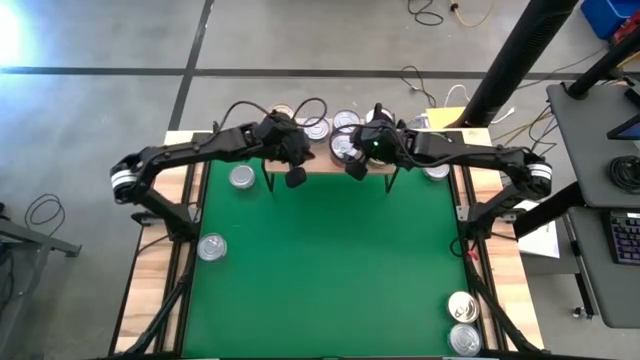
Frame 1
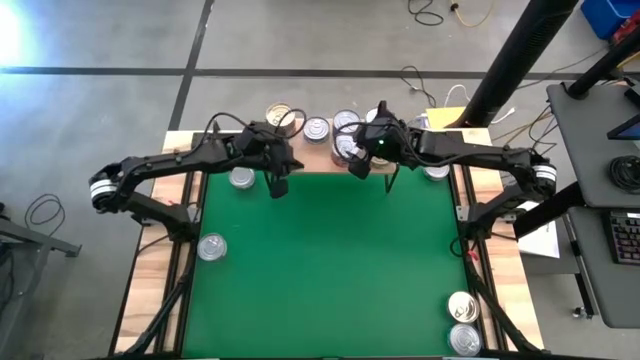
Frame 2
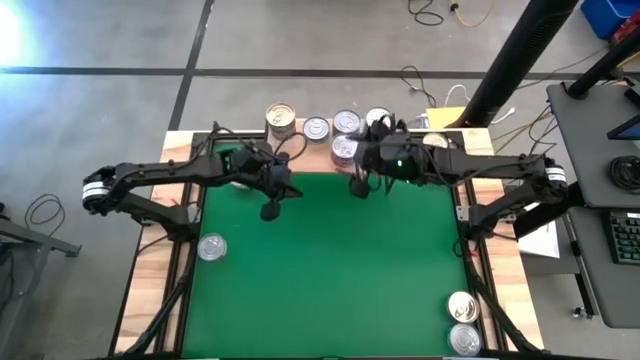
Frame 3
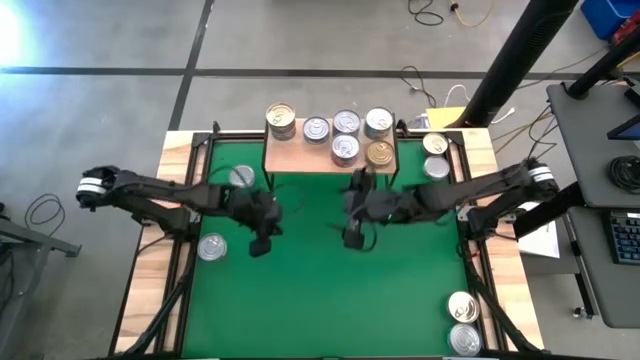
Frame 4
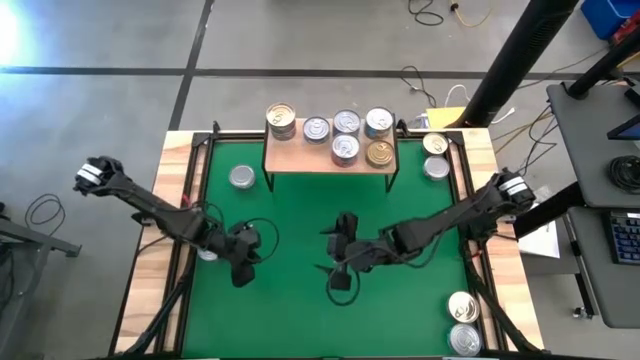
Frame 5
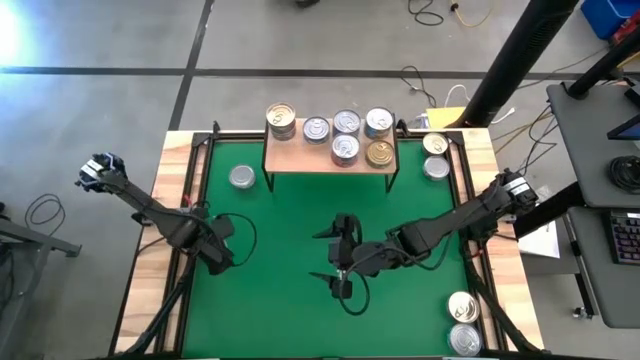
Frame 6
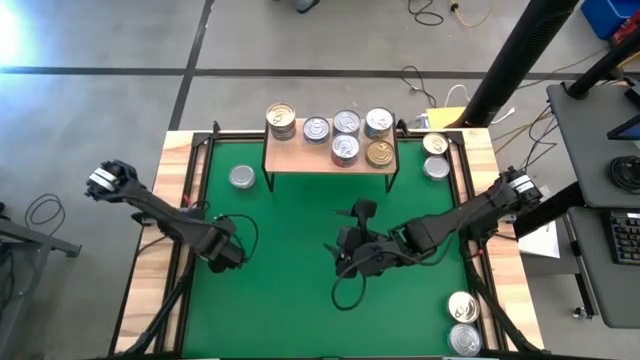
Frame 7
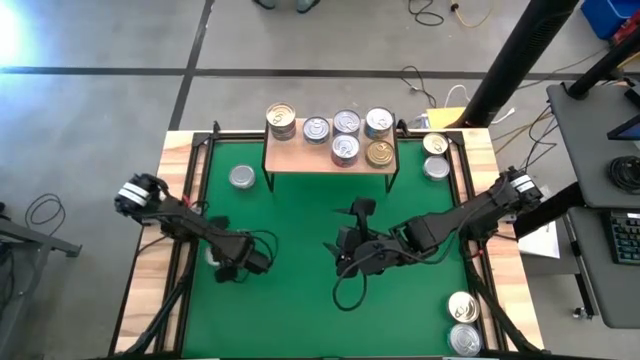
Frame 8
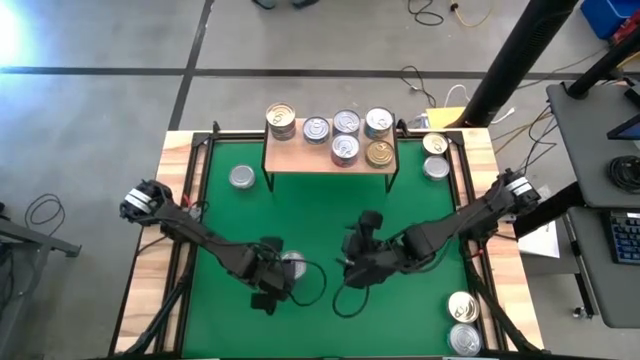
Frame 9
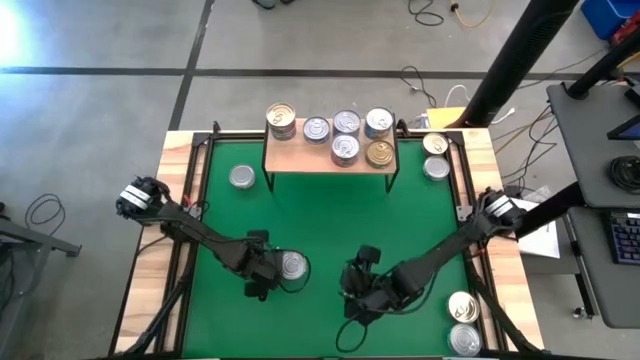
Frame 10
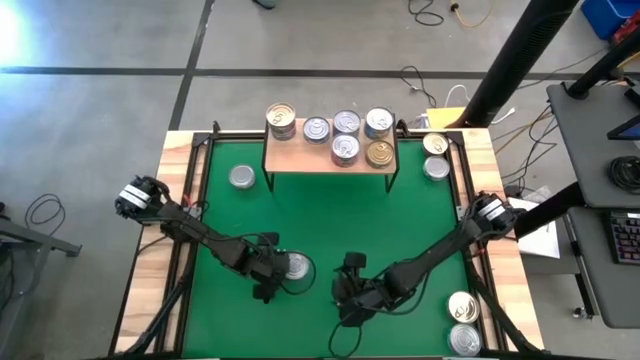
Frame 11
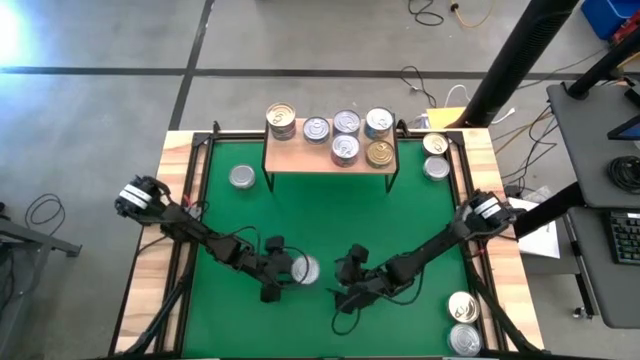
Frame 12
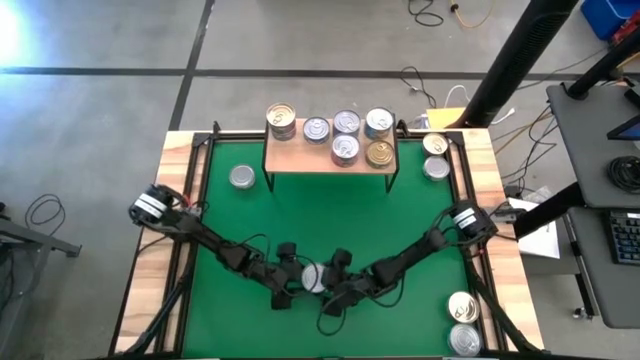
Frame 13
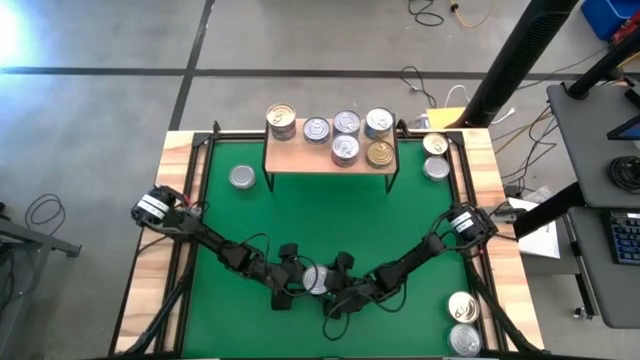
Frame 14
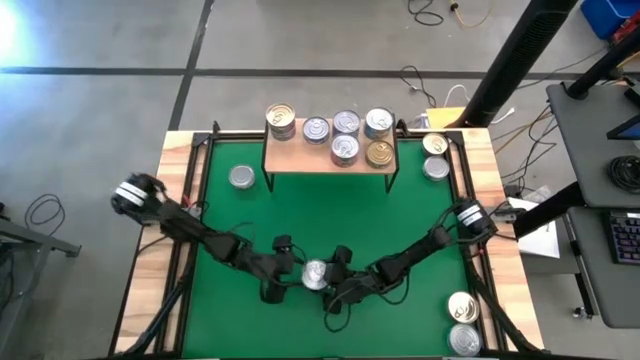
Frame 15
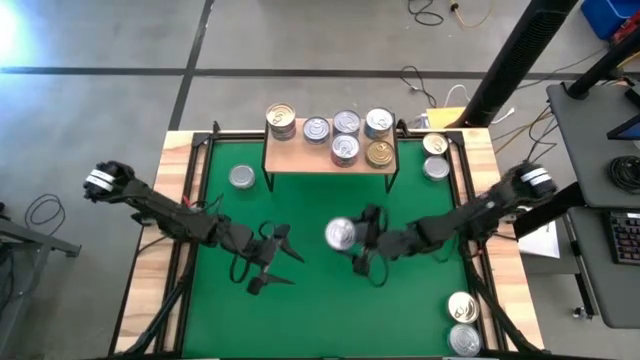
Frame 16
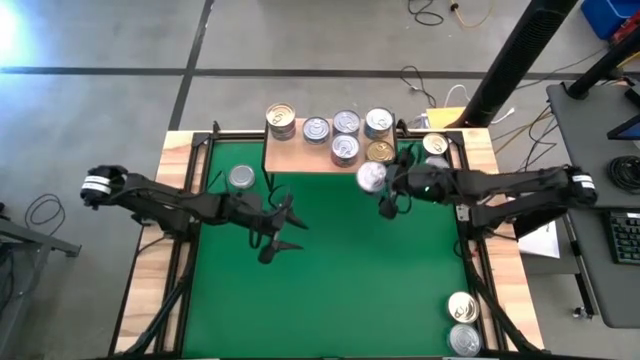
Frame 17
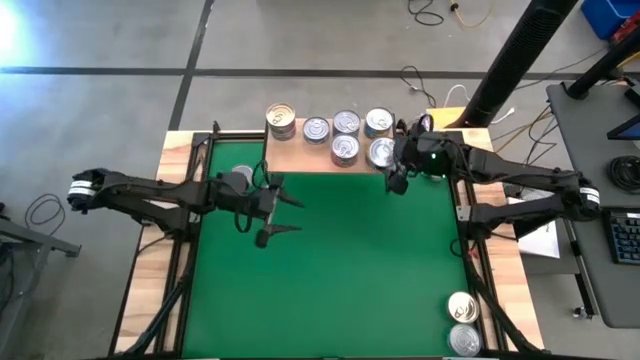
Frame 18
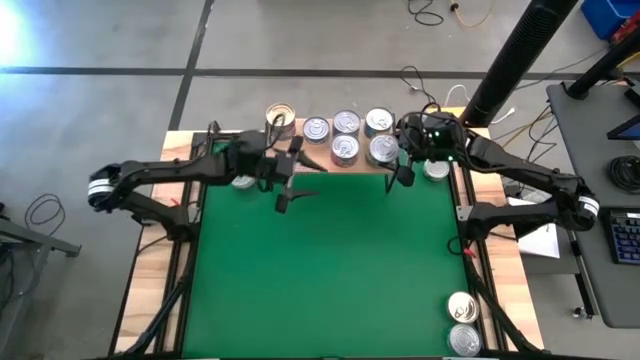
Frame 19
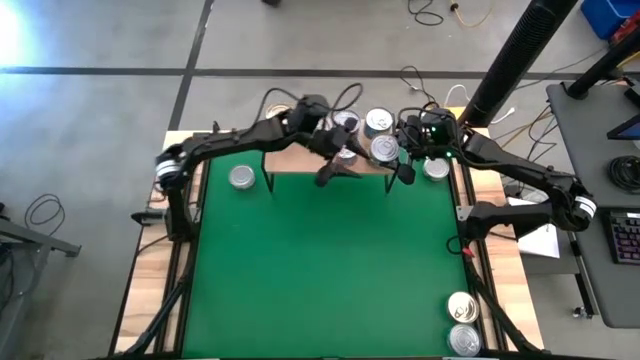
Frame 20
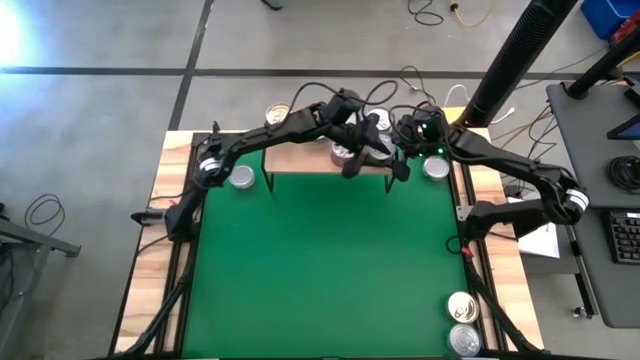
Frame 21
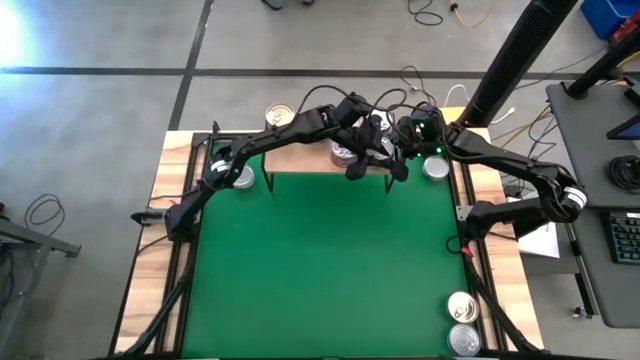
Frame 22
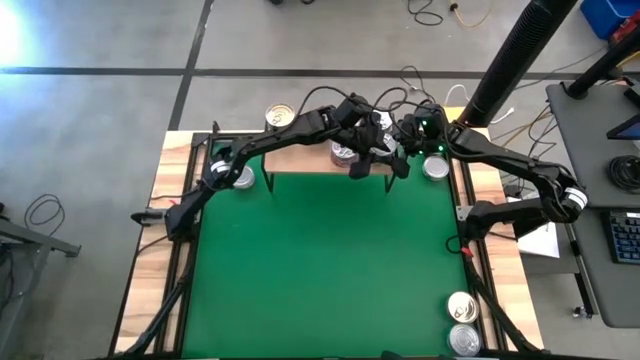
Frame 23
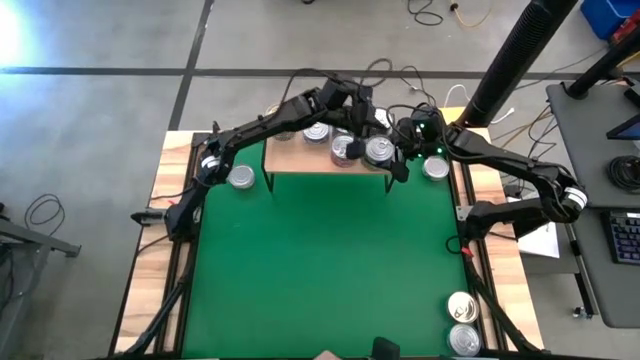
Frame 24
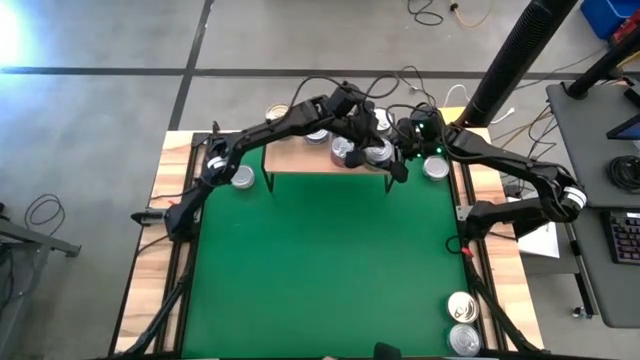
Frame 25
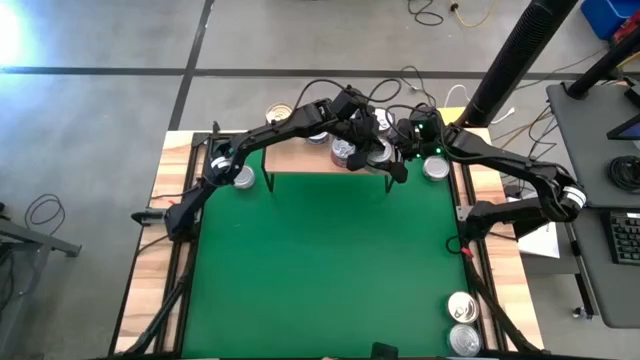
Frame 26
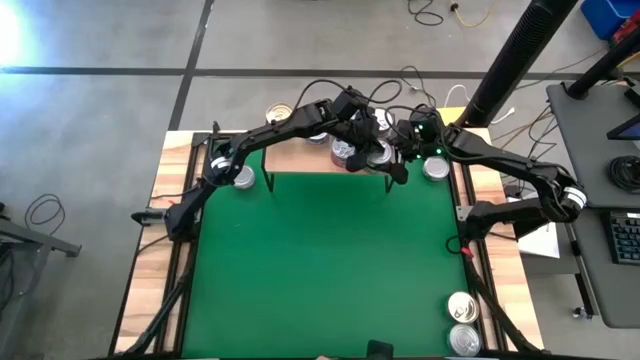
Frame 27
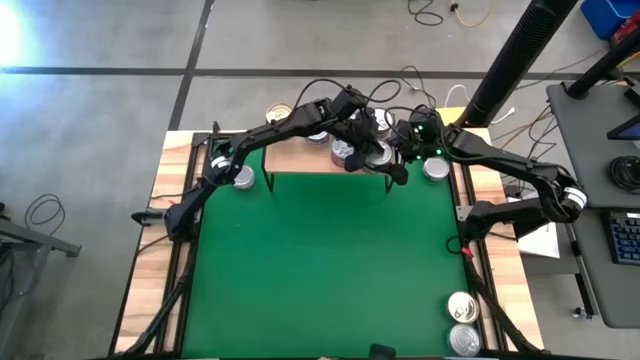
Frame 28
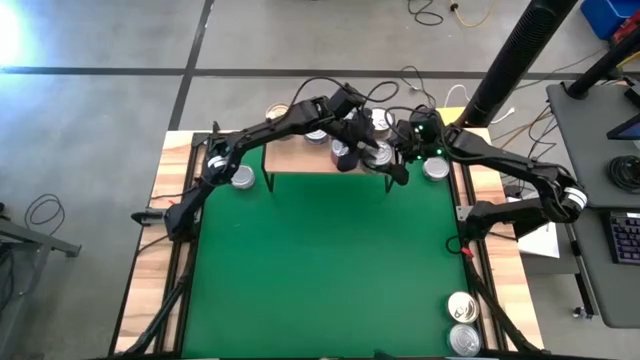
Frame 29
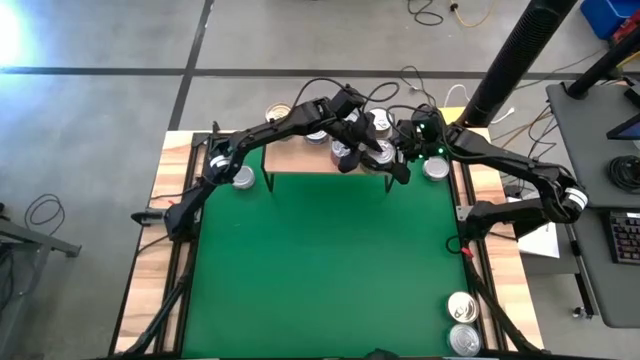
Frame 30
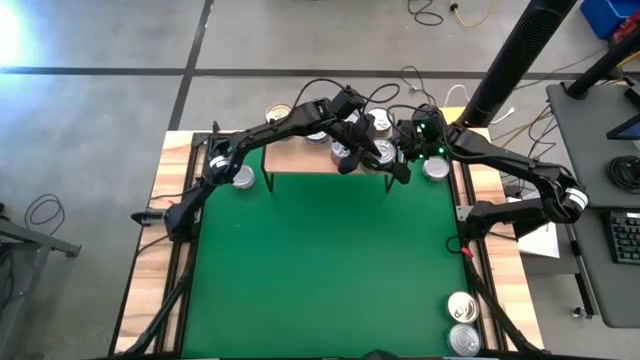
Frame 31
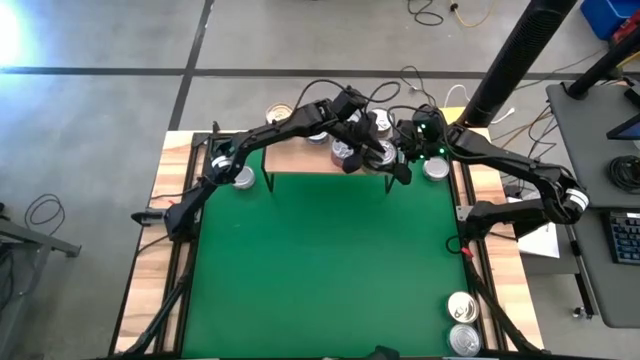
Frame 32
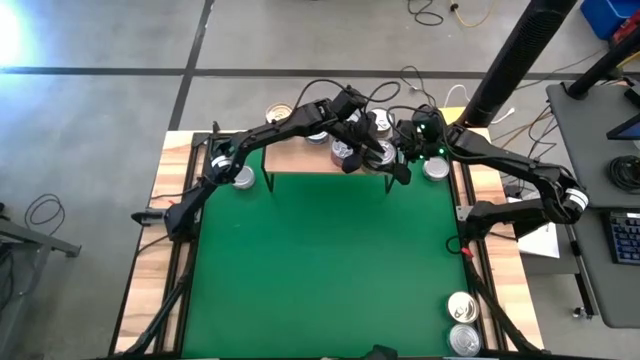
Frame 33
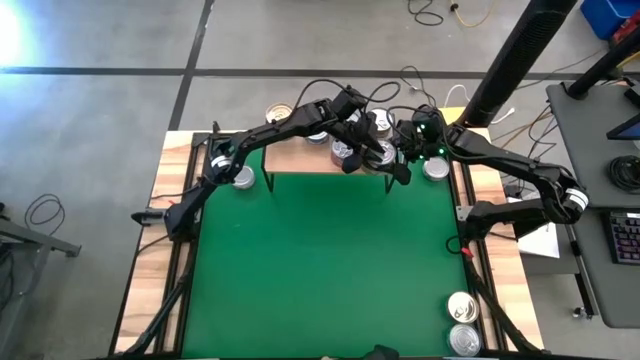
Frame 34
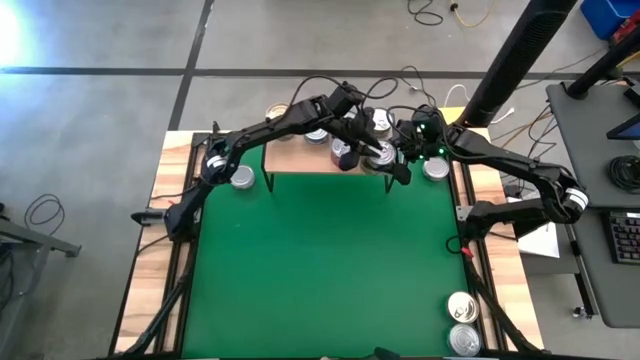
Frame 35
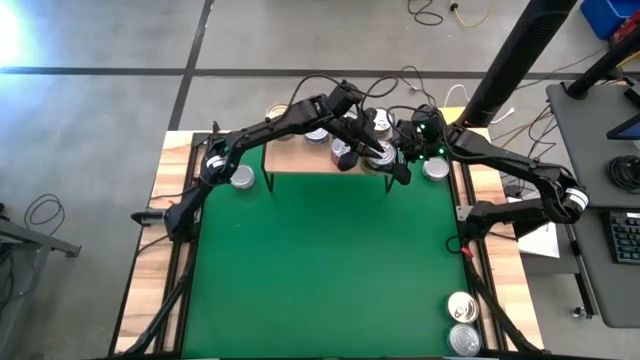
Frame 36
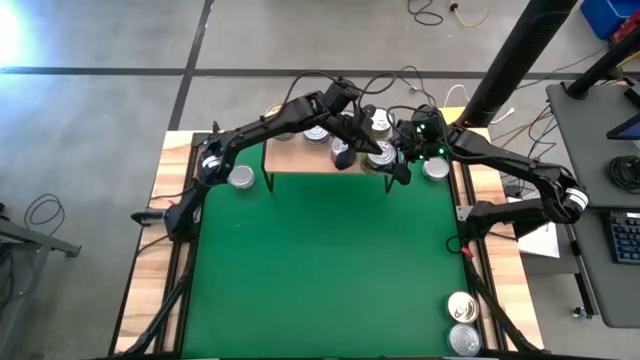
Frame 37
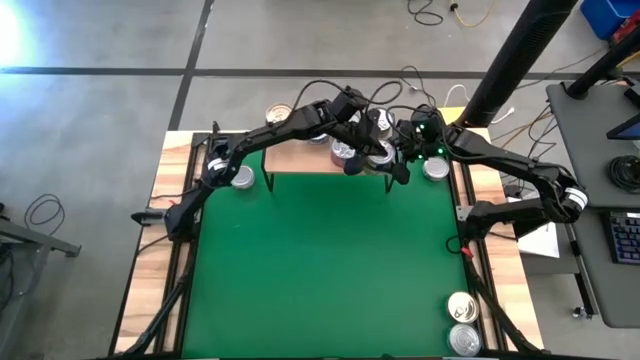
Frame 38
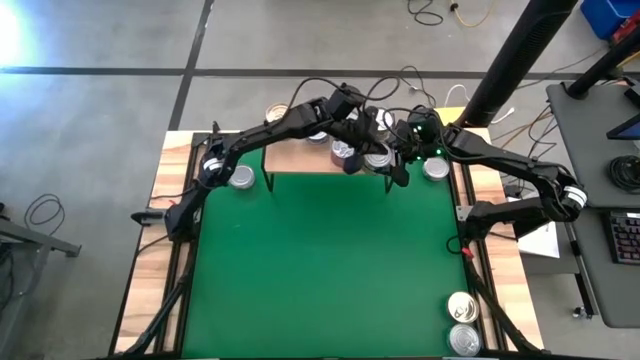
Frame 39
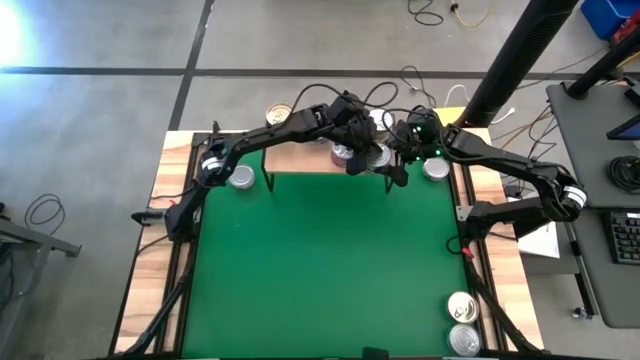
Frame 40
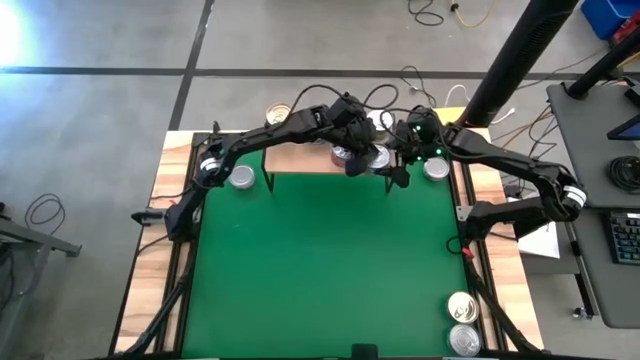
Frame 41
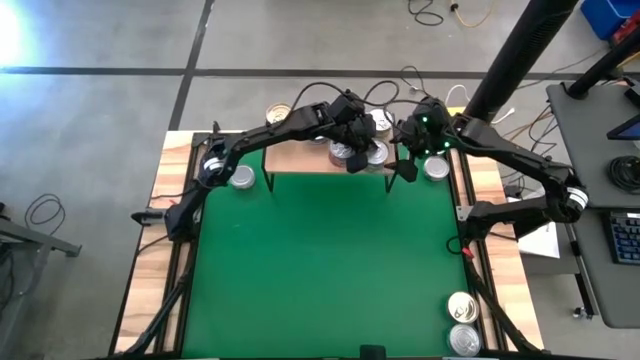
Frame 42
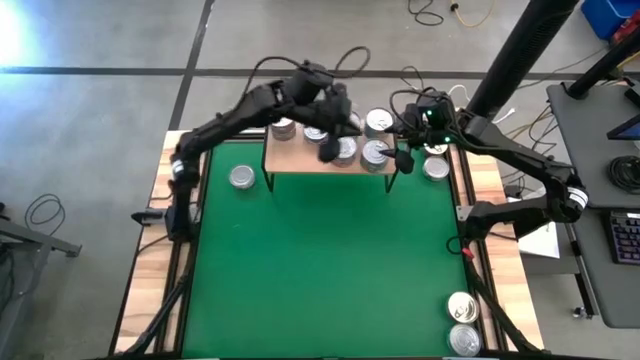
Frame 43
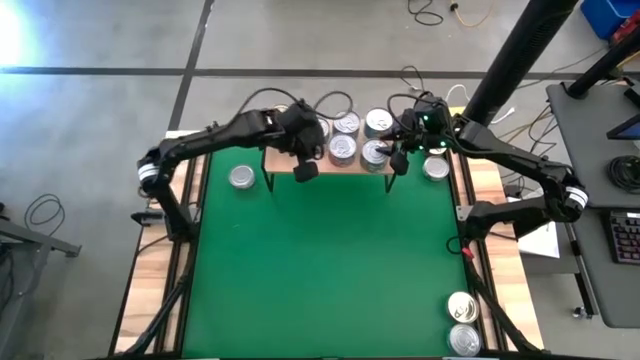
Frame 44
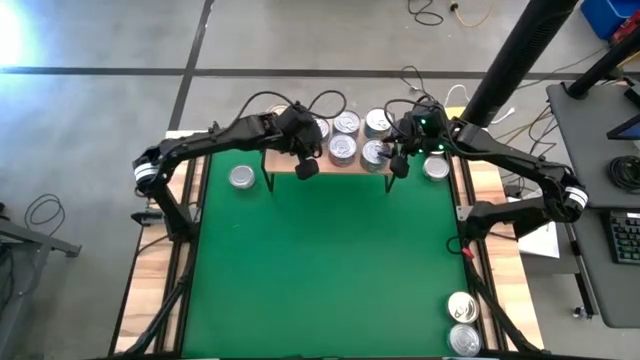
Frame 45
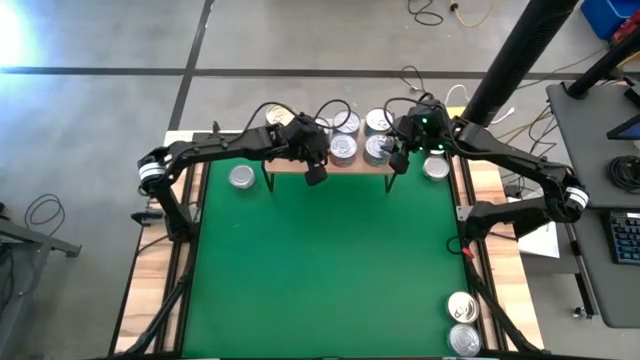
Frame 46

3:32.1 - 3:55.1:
Task: Stack canned seafood by type on shelf
Stack the green tuna can on top of the green tuna can on the shelf
